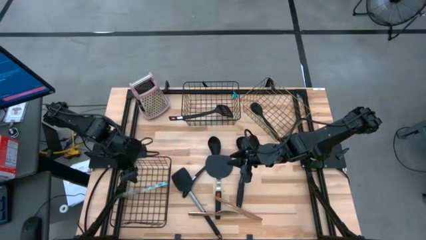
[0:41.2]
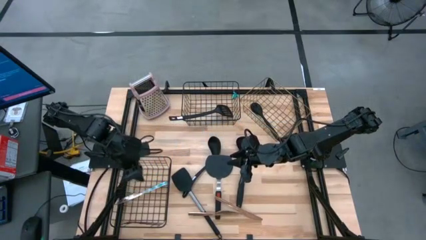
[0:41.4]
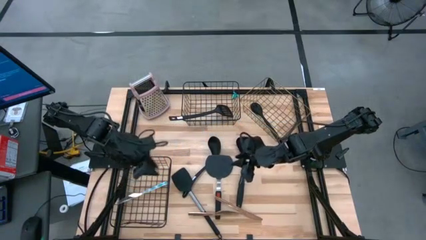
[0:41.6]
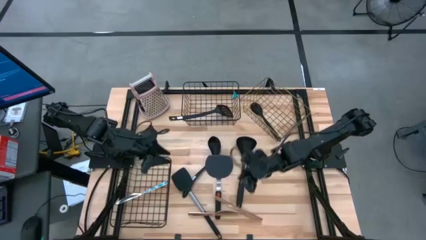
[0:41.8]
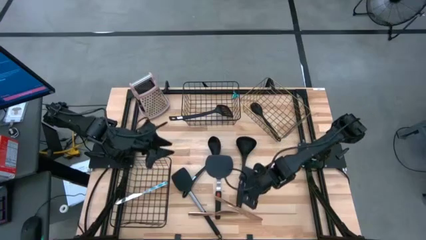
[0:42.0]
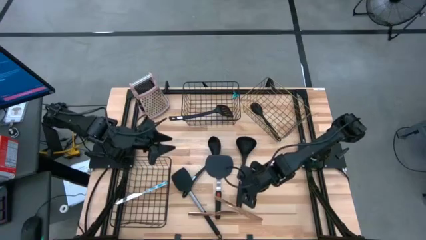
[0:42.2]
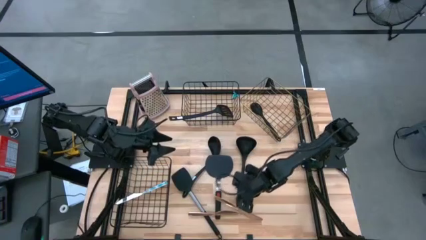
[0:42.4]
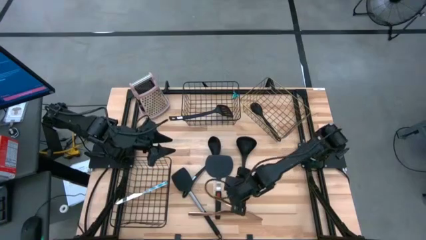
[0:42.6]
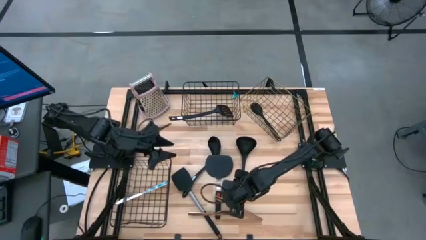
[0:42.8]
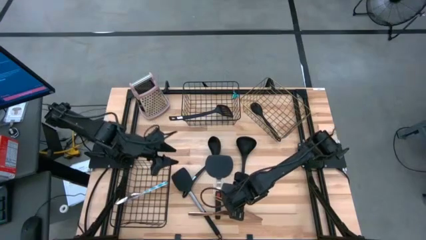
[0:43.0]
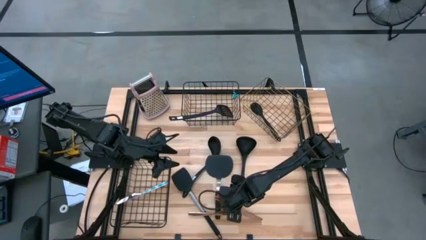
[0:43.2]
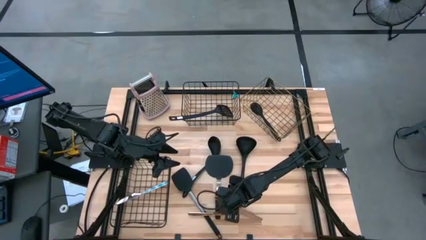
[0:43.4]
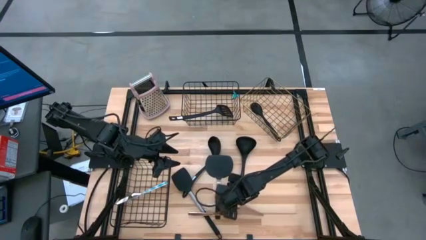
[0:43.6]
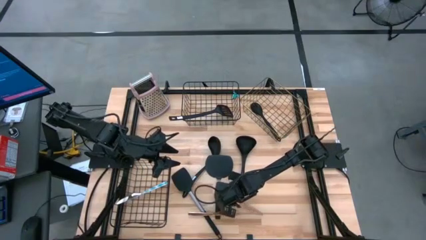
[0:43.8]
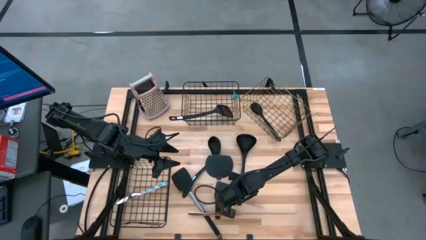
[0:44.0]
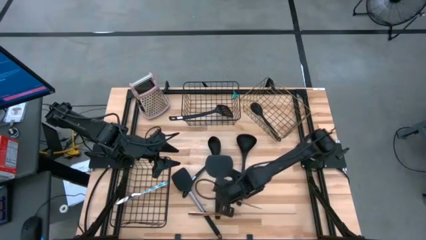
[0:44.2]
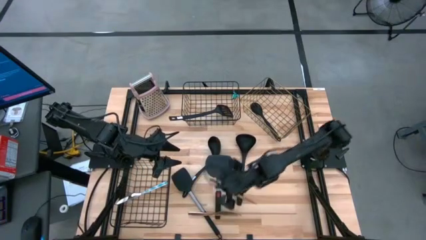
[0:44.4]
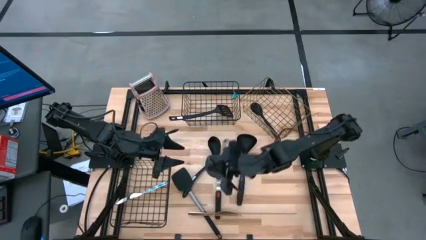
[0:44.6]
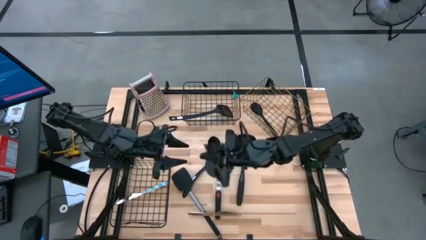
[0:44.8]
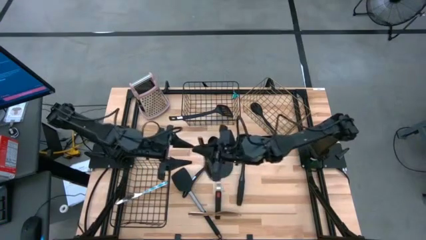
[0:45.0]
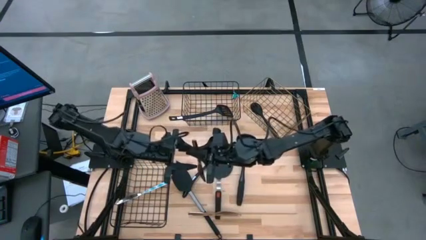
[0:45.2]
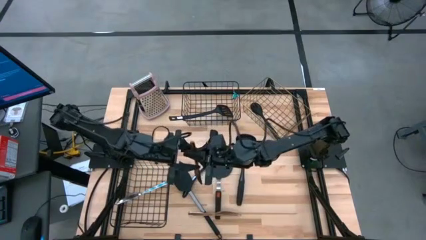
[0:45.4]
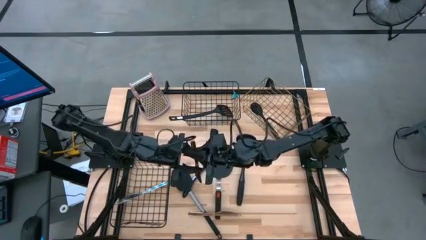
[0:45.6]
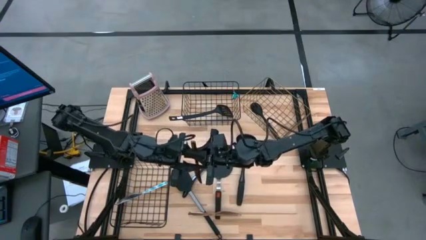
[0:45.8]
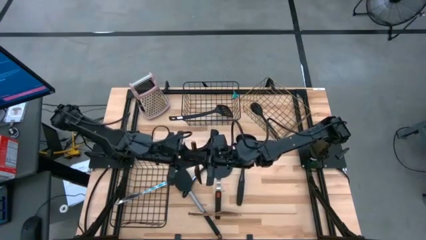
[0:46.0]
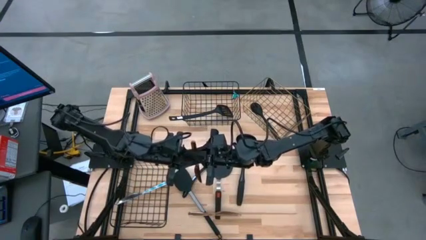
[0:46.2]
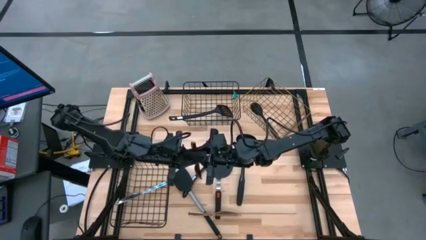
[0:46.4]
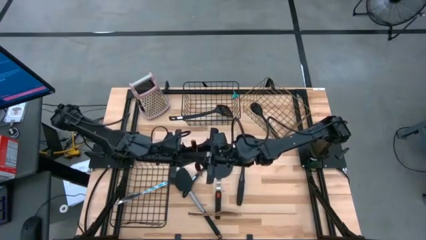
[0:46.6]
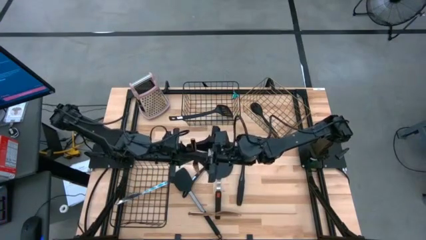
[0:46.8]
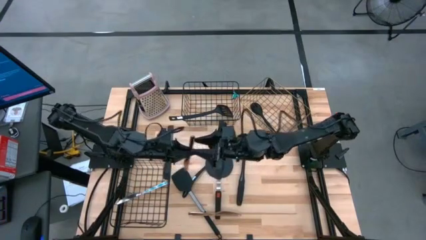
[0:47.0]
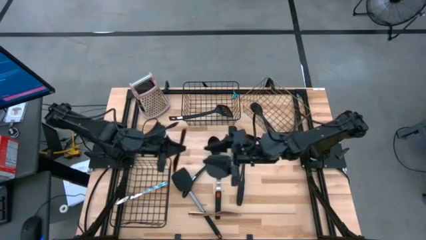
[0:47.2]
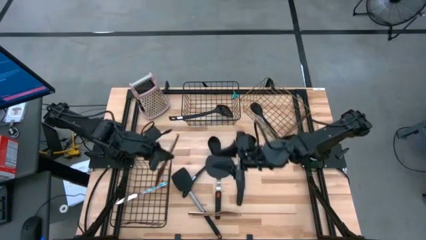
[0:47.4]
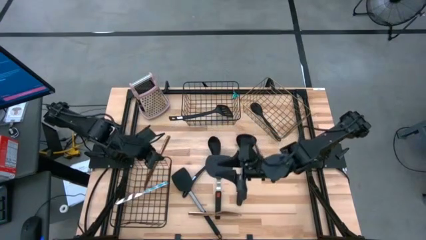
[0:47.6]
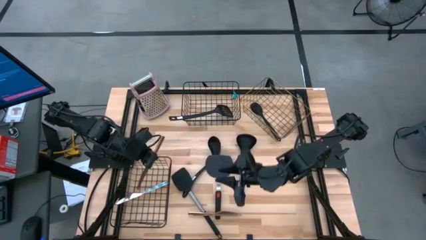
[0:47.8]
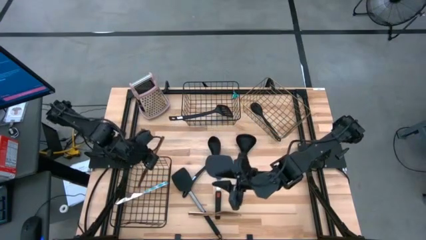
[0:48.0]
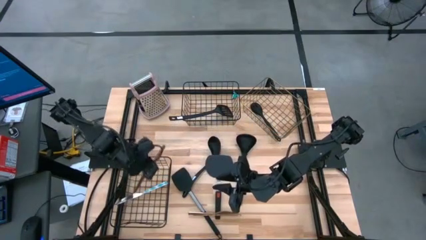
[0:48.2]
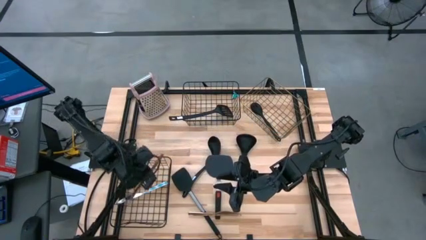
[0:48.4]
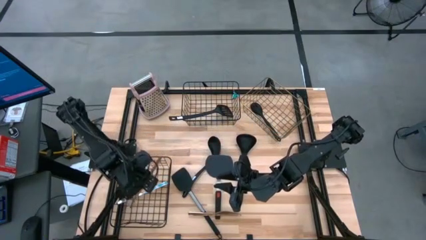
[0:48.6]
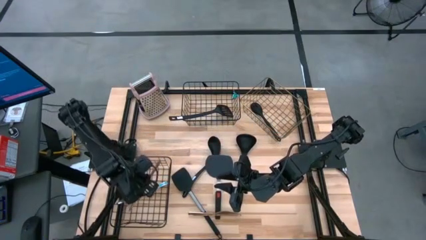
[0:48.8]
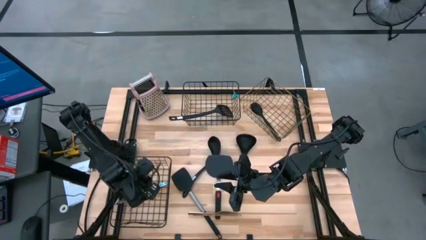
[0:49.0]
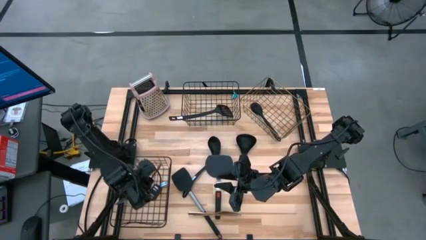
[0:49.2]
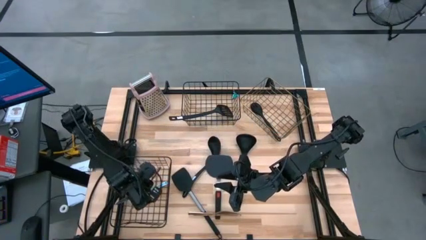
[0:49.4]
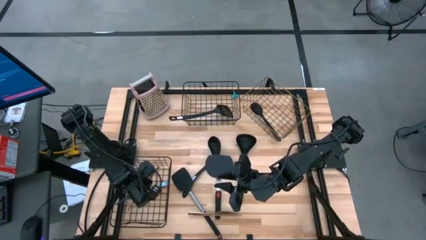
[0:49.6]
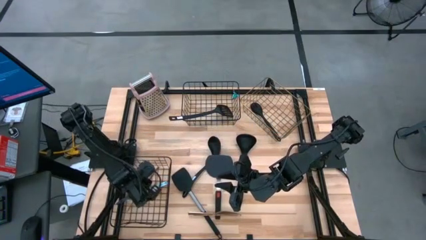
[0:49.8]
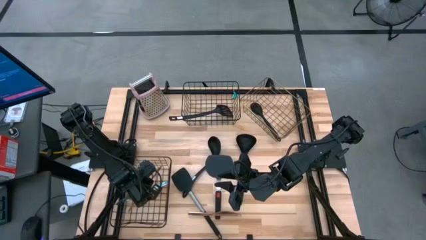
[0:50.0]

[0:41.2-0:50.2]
Task: Pick & Place Kitchen Items
Put the top brown table knife into the bottom wire basket

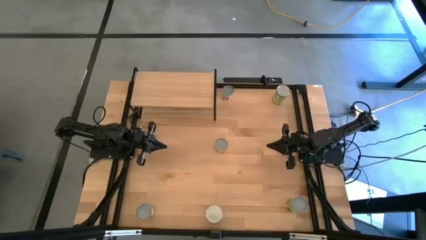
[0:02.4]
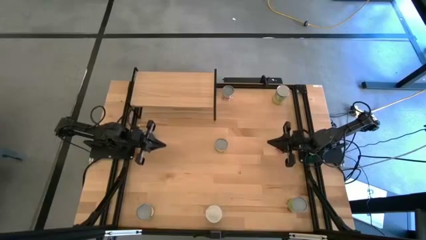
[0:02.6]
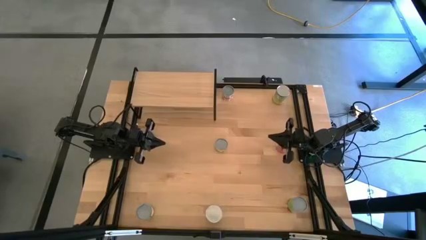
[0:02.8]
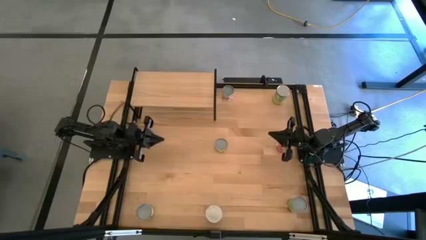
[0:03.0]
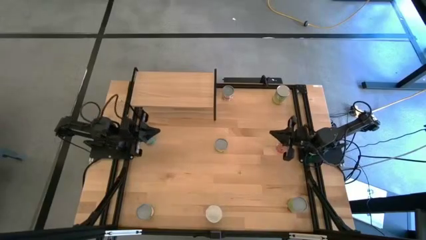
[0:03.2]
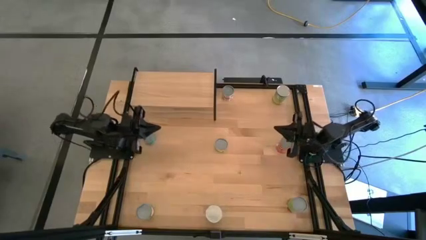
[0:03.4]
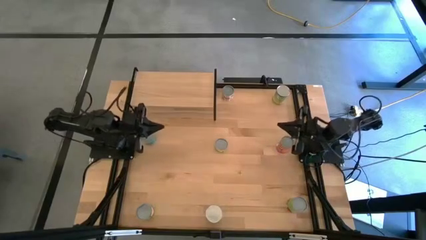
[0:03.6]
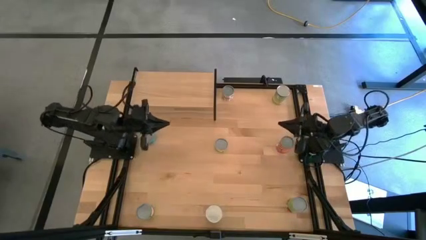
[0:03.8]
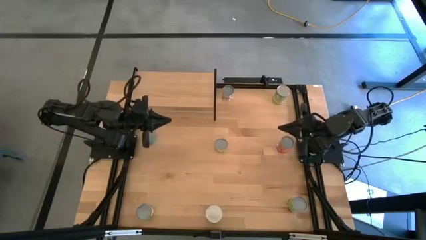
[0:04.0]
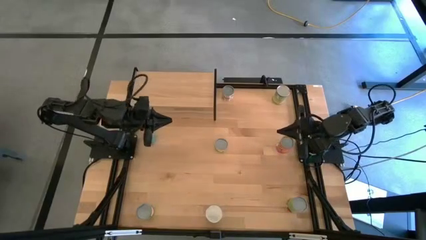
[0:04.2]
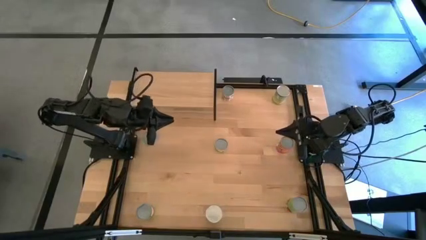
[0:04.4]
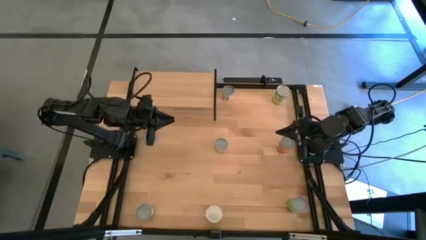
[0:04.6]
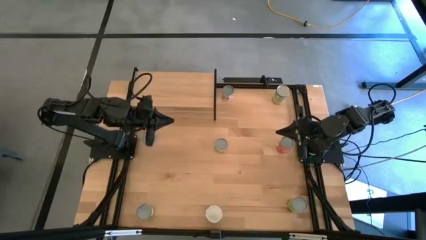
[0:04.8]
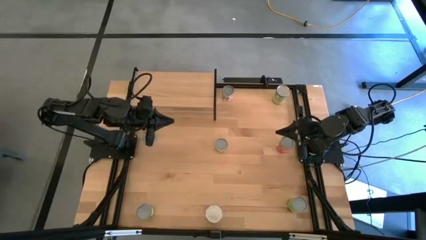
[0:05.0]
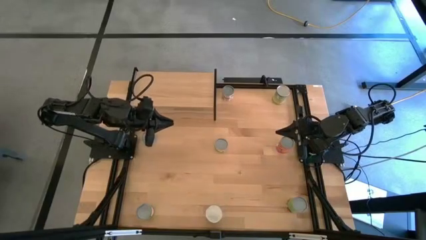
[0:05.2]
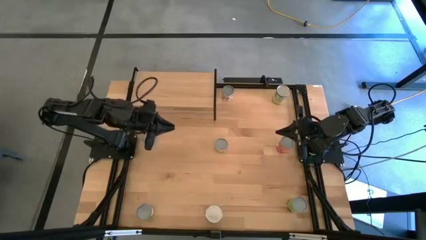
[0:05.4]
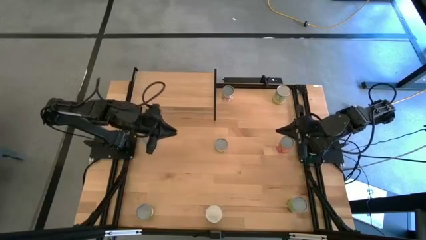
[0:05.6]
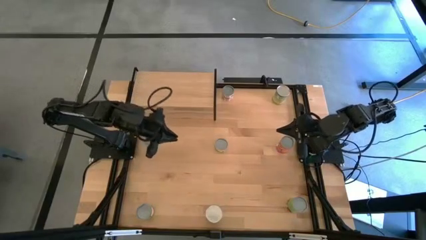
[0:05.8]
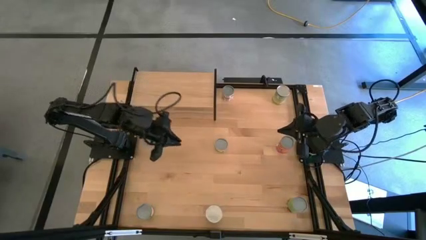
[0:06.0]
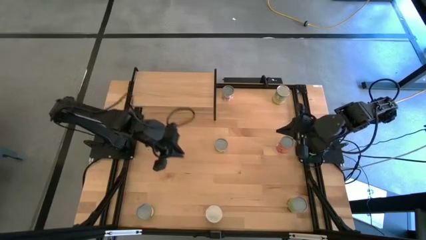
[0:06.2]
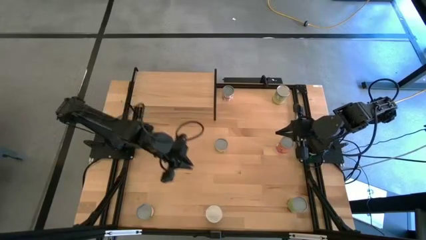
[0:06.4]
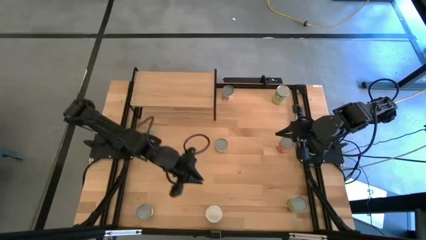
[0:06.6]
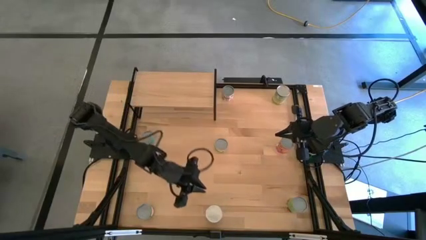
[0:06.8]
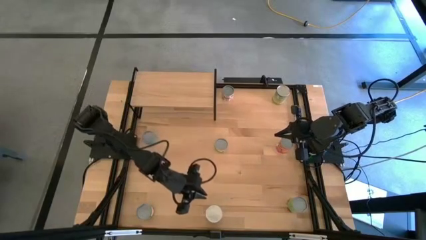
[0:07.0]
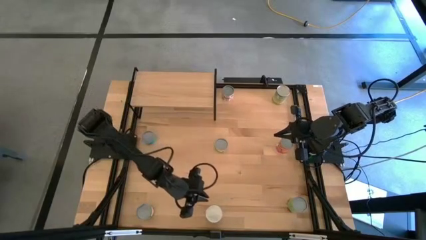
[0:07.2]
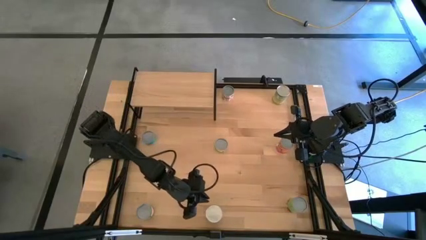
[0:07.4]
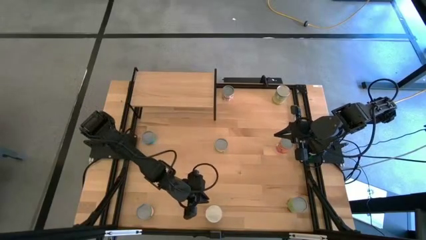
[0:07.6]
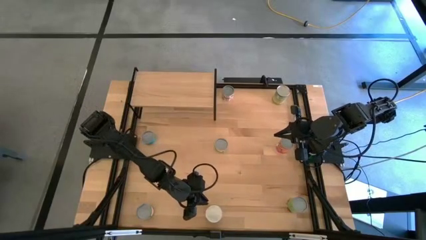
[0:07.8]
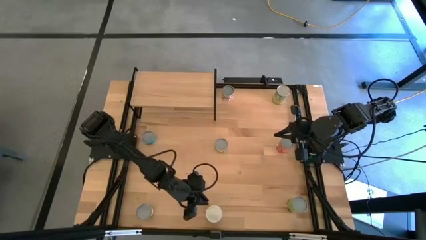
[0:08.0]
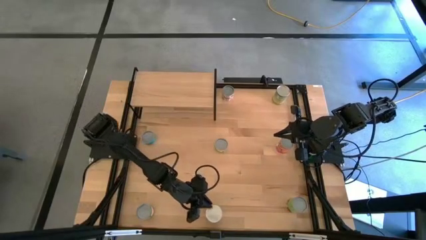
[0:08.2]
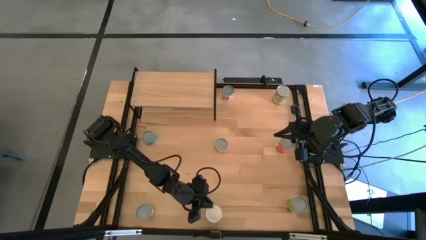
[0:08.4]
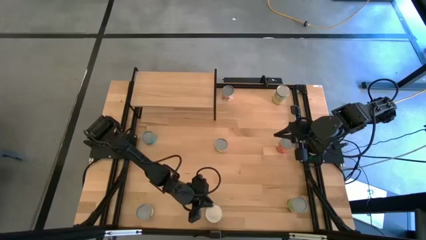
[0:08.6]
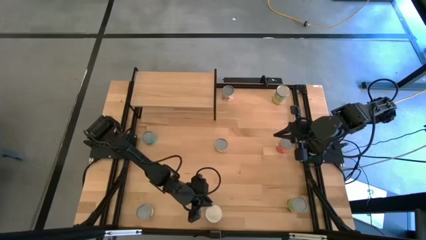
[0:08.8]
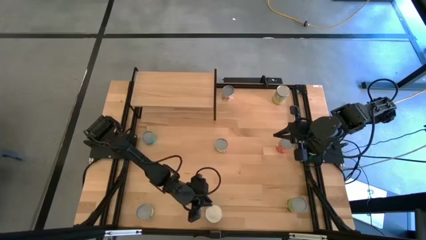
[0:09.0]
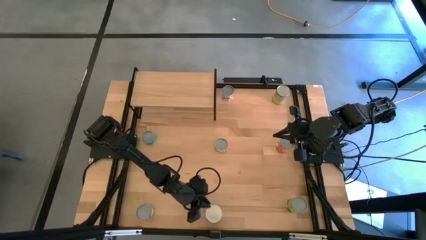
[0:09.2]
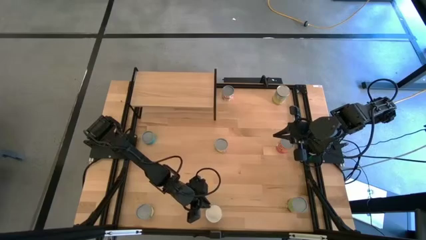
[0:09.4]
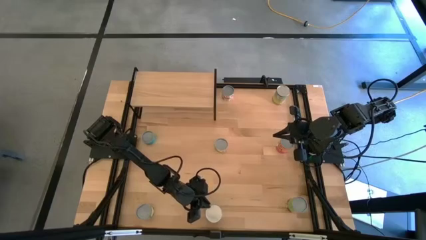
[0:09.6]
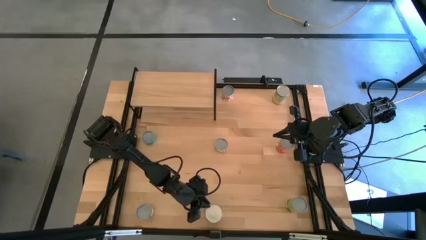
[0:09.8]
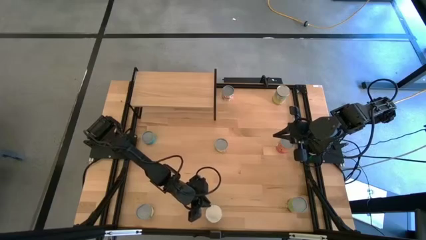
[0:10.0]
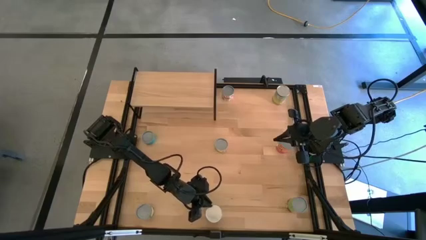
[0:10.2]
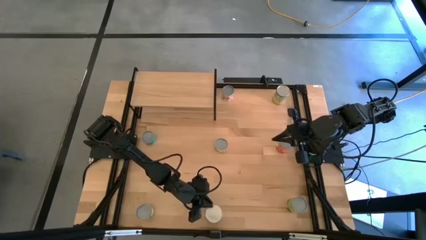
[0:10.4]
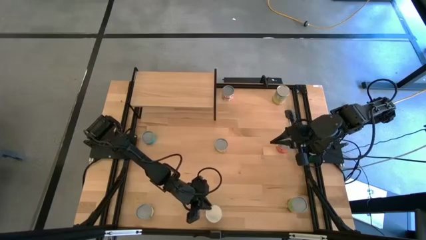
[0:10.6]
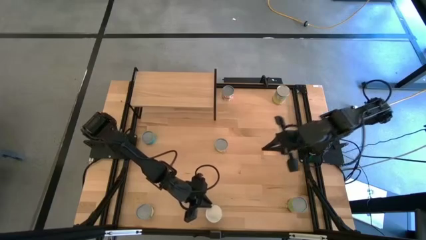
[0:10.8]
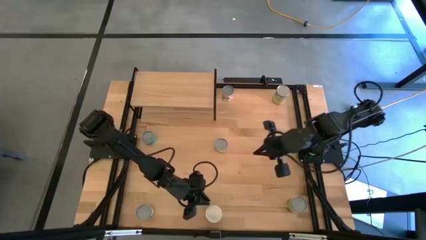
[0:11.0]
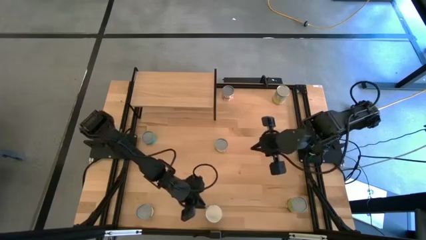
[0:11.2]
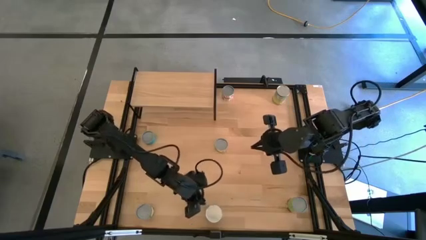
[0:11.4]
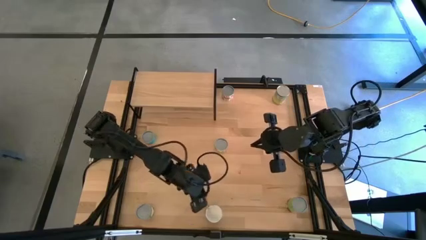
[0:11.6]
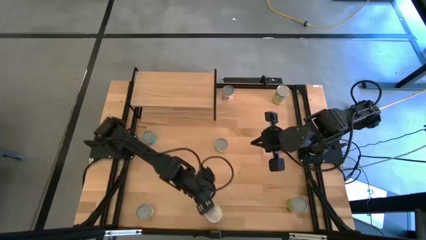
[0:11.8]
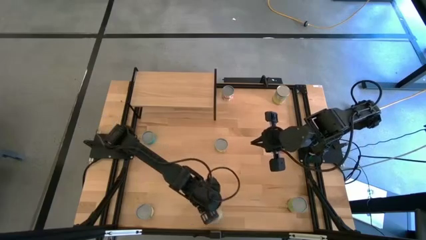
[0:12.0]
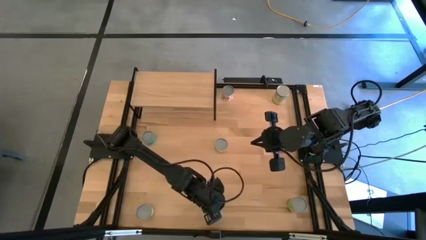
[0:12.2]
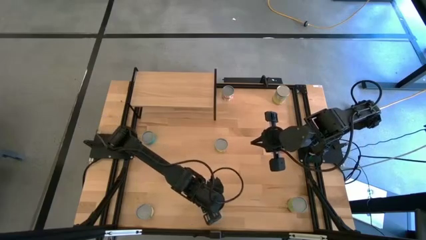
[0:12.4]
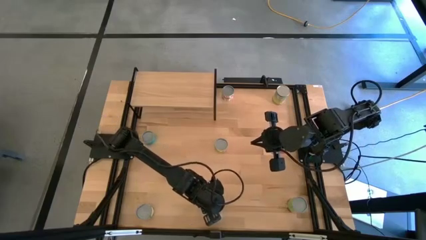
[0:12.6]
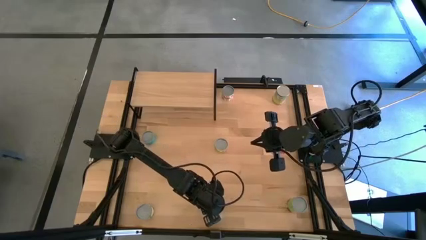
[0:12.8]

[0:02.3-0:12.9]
Task: Pick and place cans onto a shelf
Put the canned oranges on the shelf
